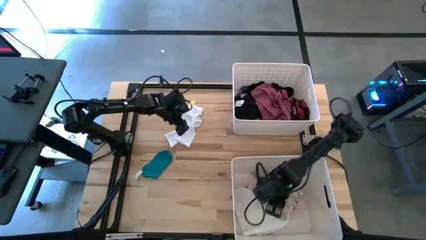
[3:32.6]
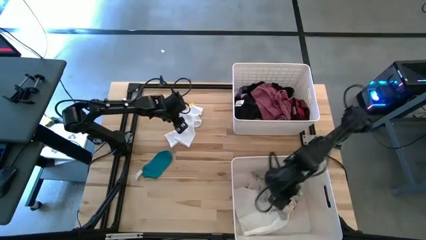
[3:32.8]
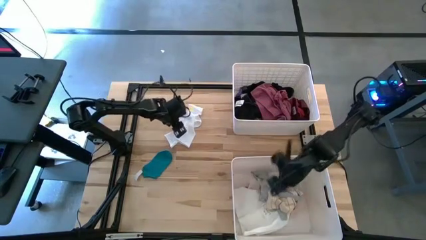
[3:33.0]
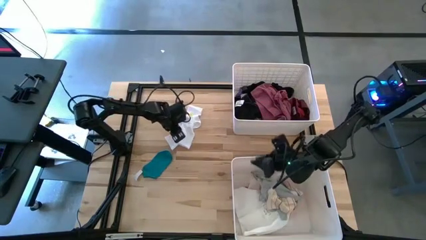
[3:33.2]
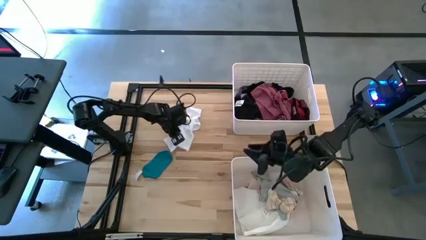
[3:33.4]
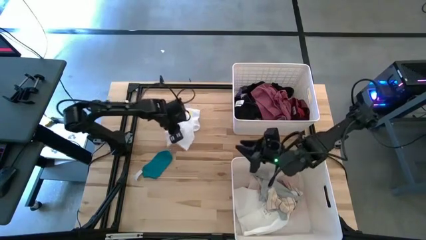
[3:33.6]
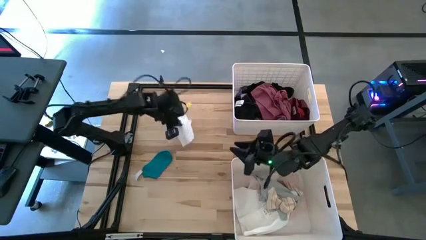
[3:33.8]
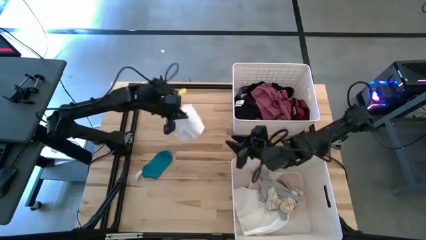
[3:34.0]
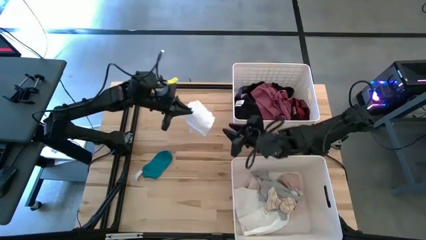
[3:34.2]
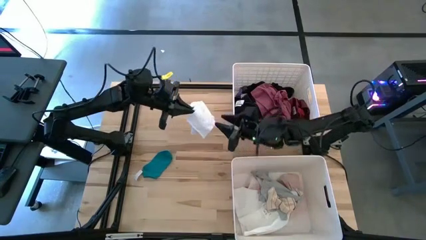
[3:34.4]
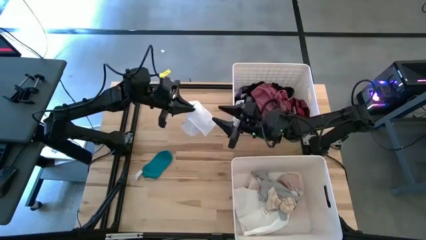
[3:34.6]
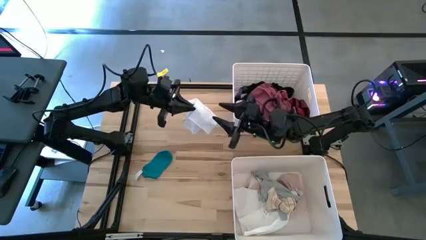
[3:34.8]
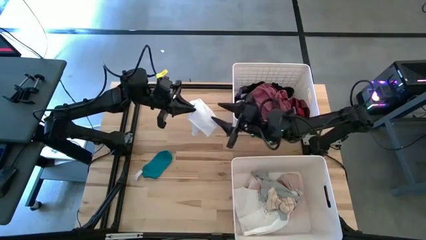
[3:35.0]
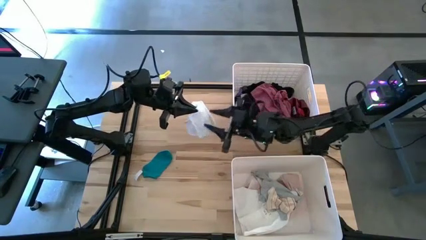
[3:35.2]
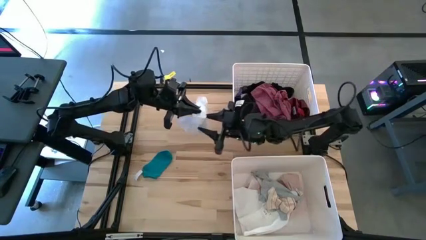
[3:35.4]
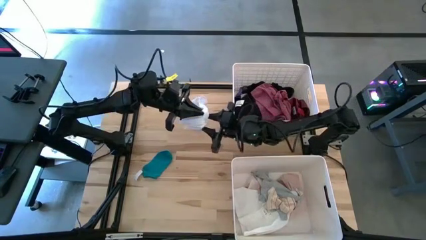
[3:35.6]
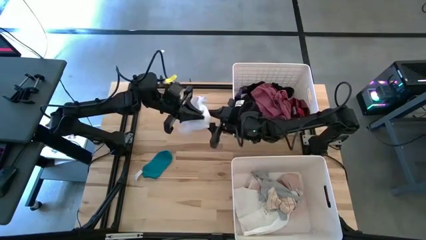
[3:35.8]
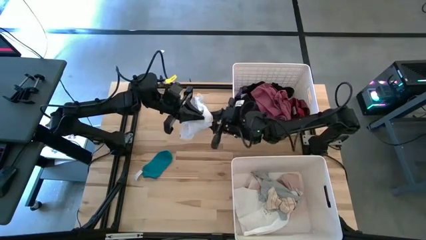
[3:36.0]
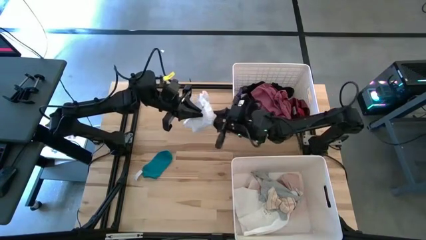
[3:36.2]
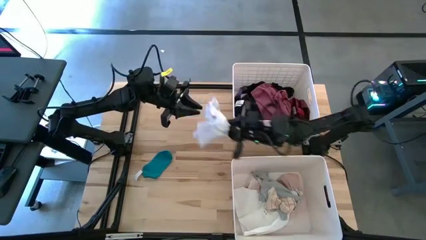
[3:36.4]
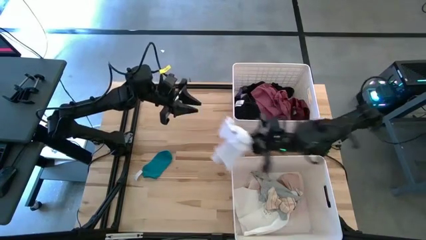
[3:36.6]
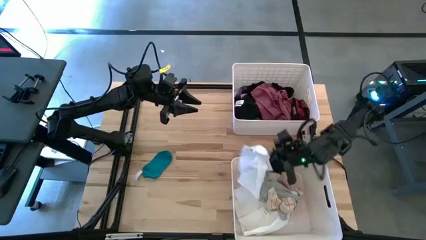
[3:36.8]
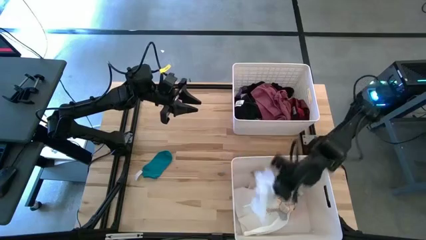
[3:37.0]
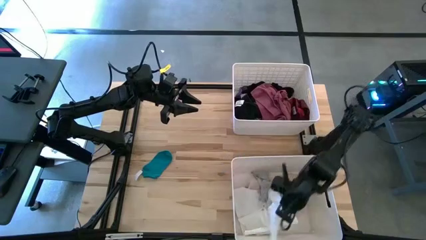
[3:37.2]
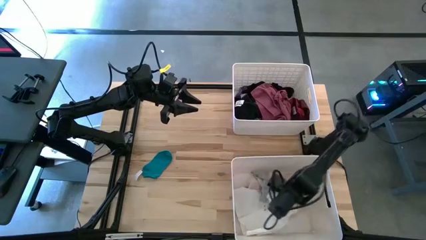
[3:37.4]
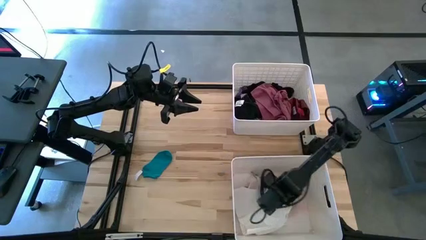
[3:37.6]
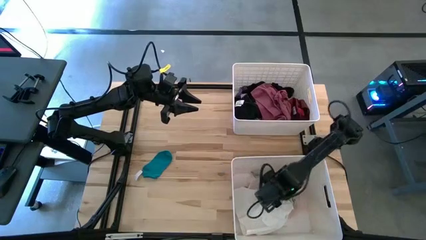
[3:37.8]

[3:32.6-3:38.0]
Task: Sort clothes
Put the white sock into the bottom bin

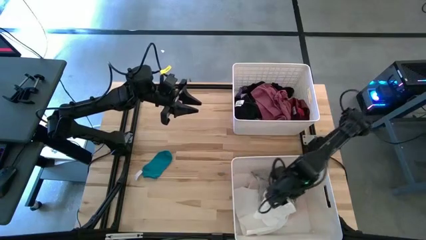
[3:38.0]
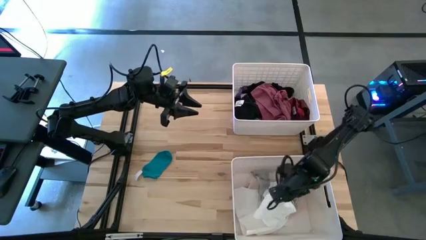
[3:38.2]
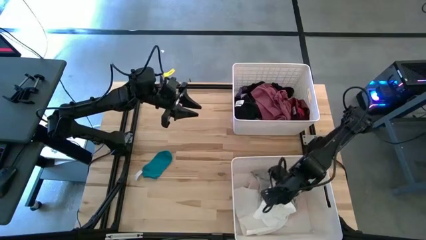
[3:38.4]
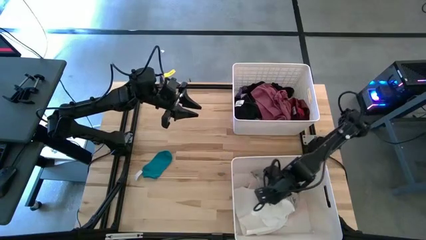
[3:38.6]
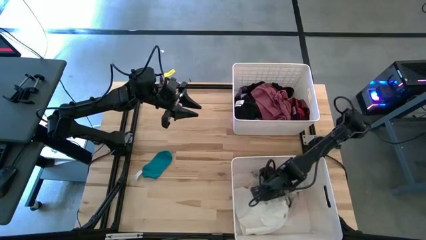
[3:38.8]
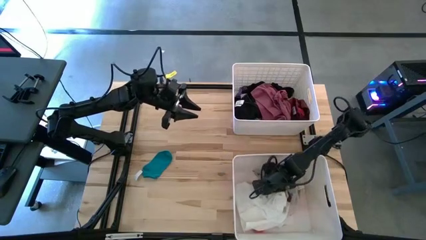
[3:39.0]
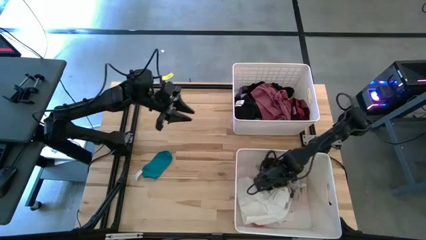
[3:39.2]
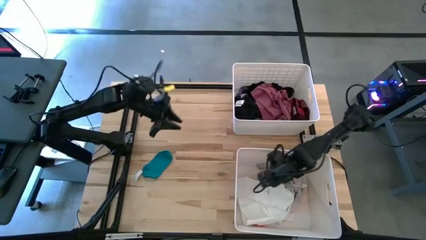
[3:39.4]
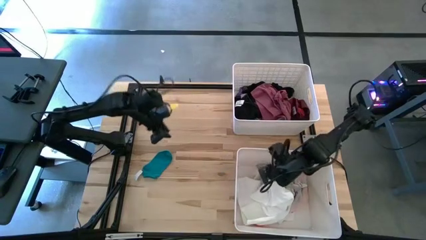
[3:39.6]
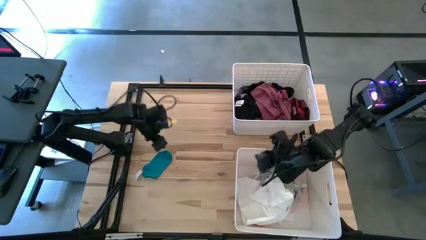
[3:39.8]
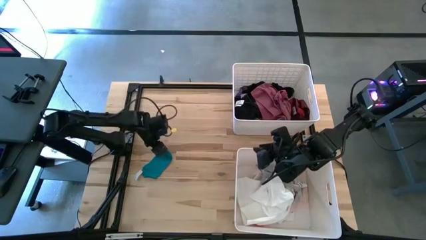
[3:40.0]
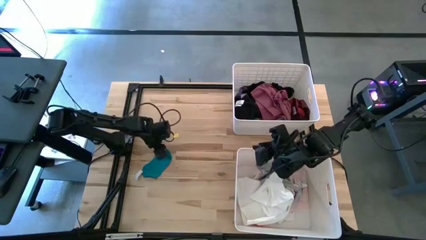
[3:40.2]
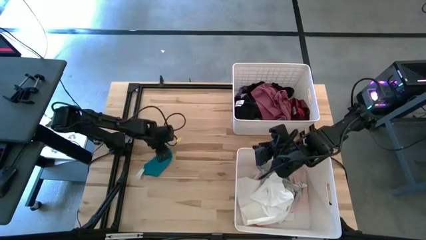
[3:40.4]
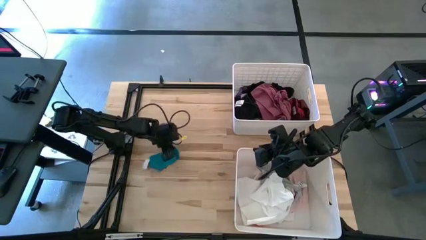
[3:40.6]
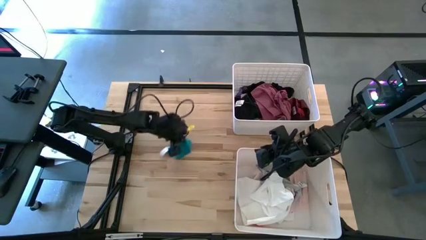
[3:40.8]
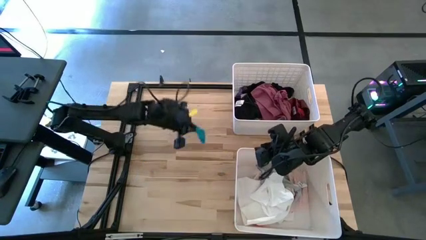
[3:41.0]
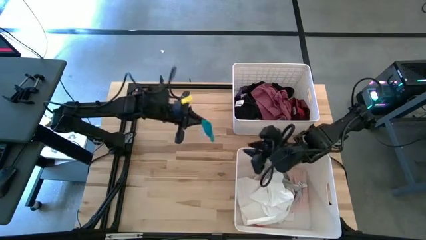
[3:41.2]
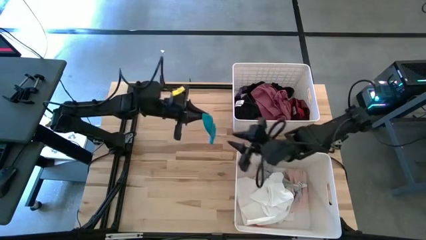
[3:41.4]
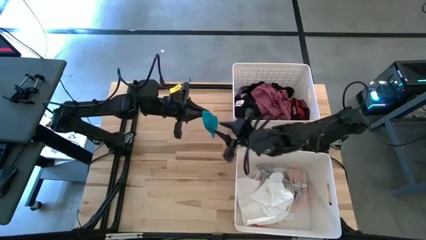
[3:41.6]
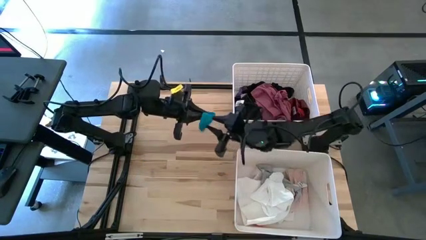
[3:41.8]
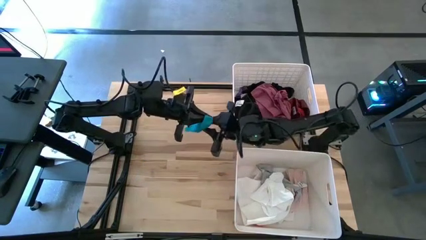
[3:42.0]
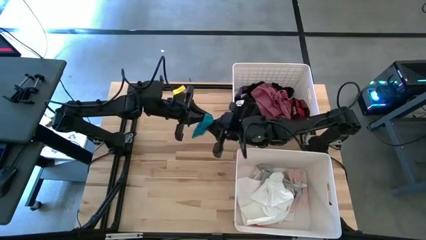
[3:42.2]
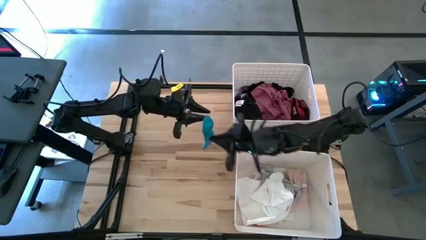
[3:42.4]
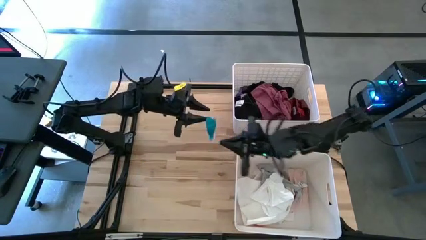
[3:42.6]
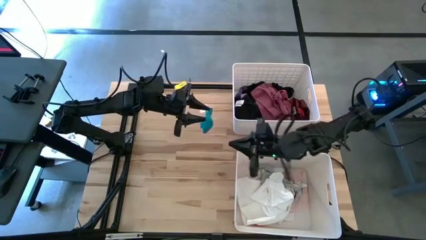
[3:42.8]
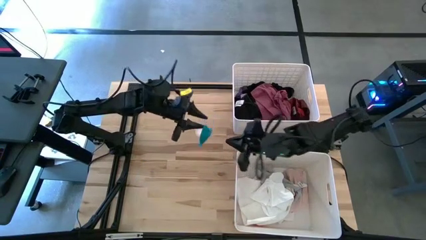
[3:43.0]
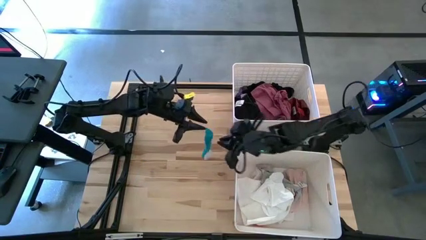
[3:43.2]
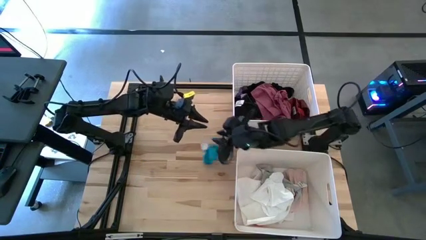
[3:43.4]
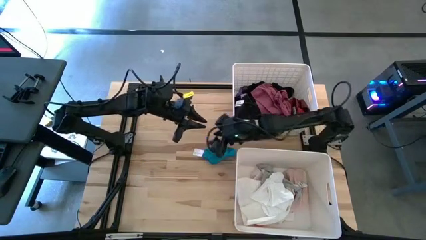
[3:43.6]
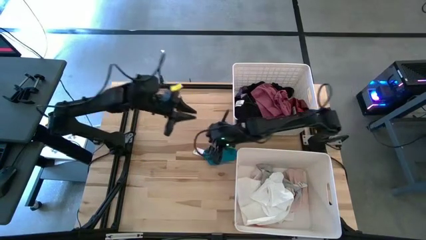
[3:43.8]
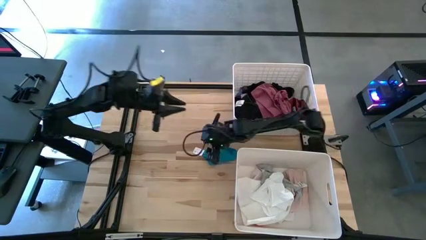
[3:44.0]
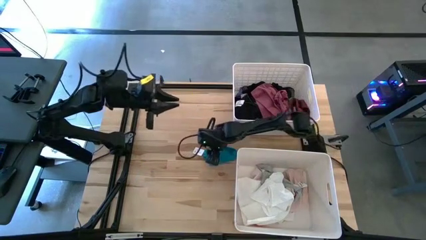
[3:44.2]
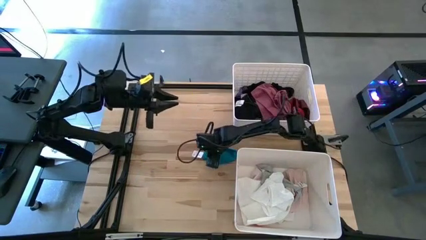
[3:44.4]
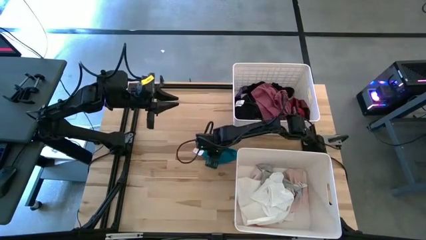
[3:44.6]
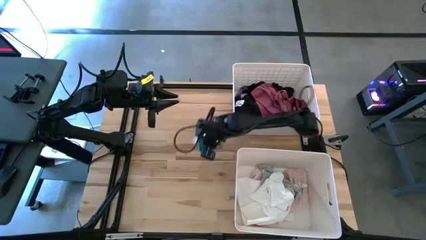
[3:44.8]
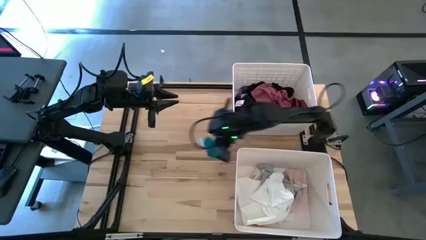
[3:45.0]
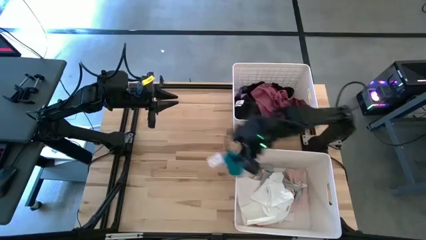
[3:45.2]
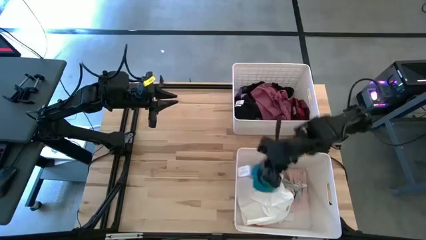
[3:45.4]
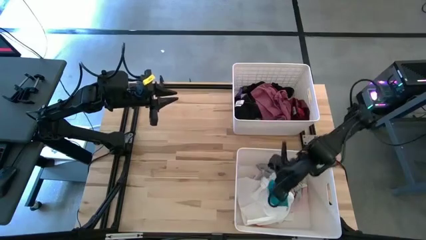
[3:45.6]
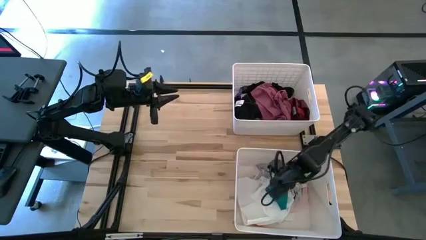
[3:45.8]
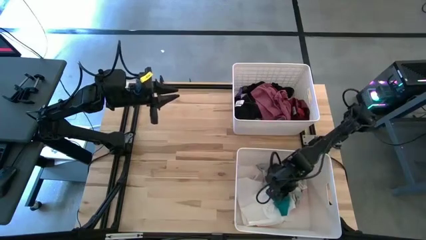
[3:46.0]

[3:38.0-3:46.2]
Put the blue sock into the bottom bin
